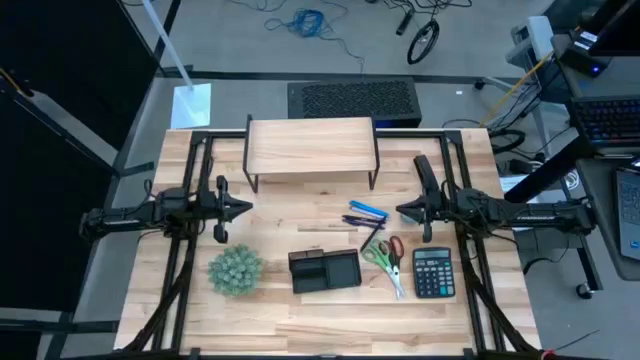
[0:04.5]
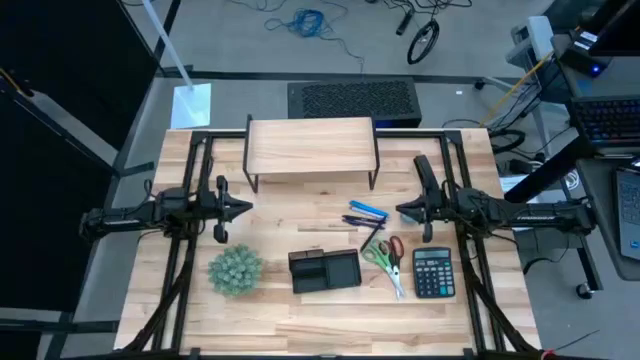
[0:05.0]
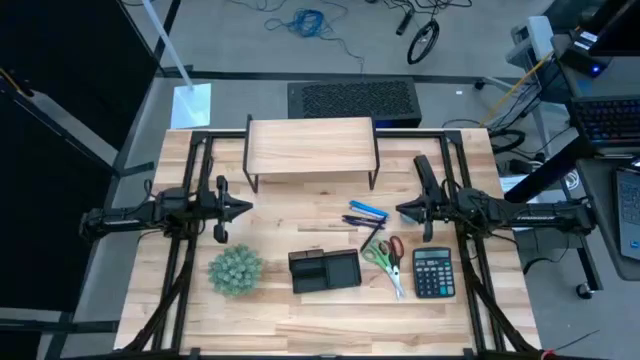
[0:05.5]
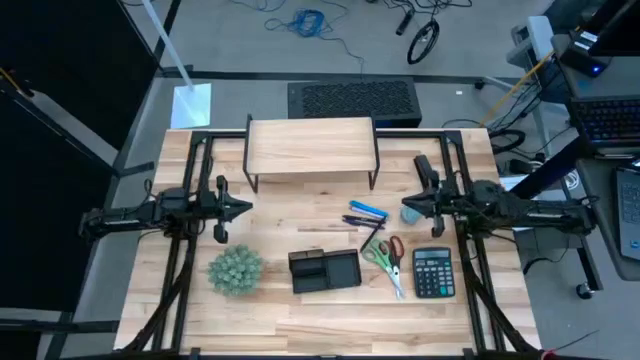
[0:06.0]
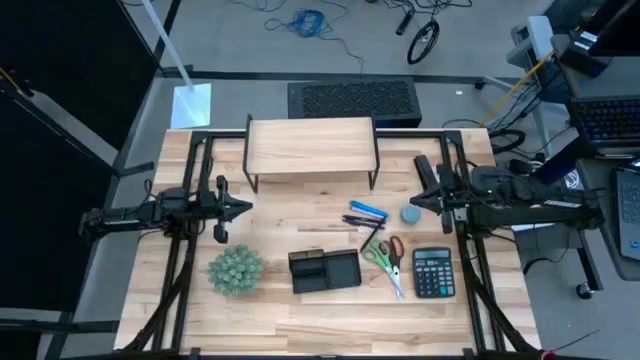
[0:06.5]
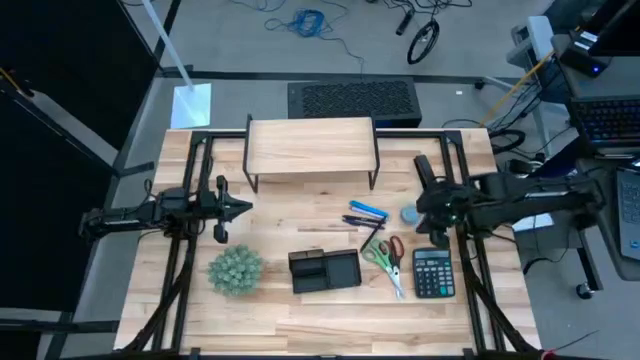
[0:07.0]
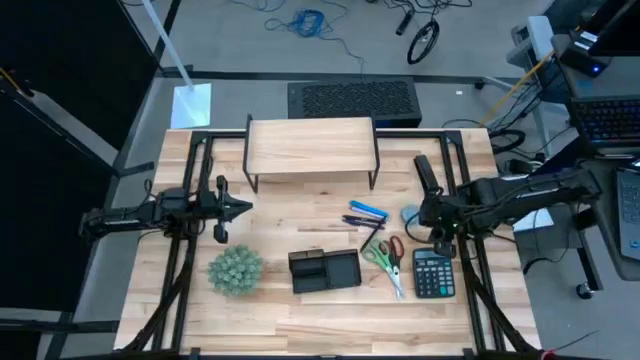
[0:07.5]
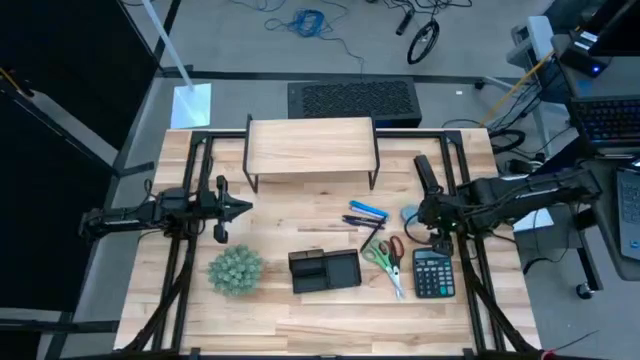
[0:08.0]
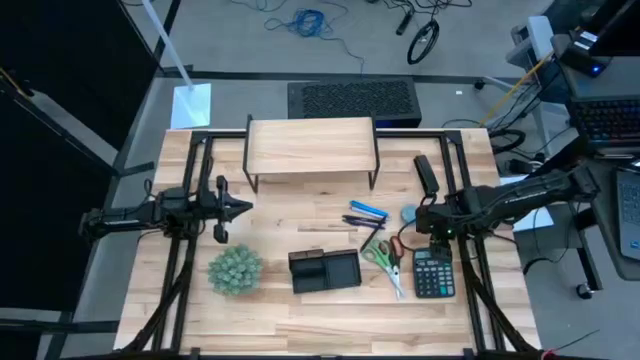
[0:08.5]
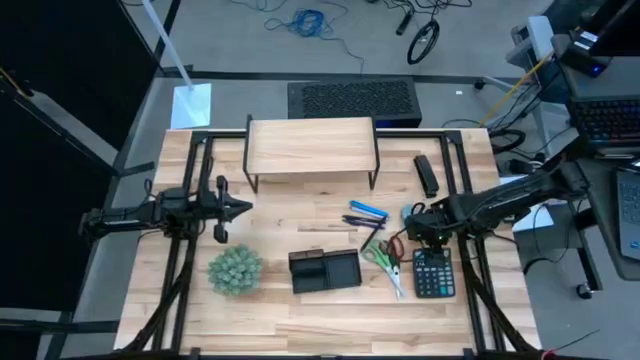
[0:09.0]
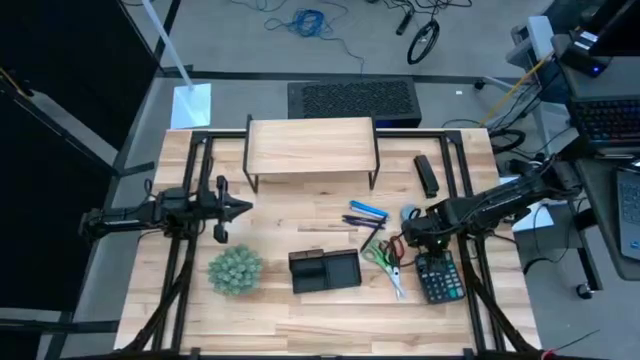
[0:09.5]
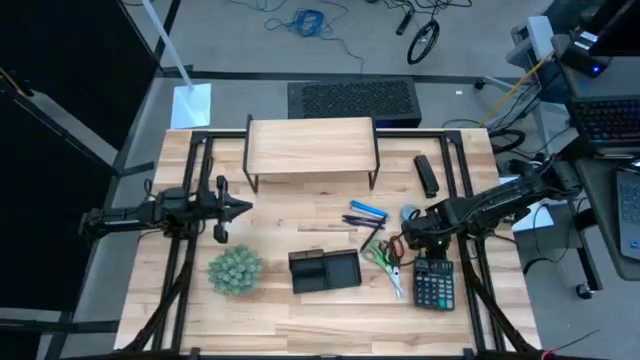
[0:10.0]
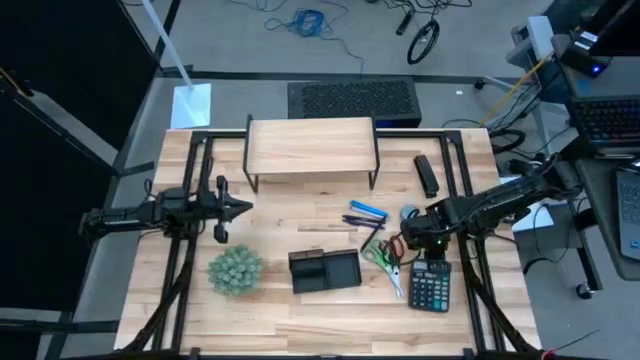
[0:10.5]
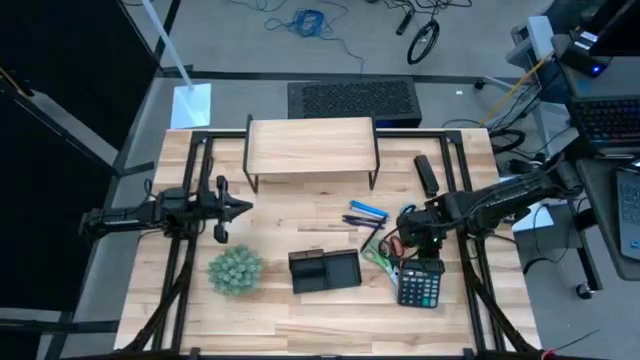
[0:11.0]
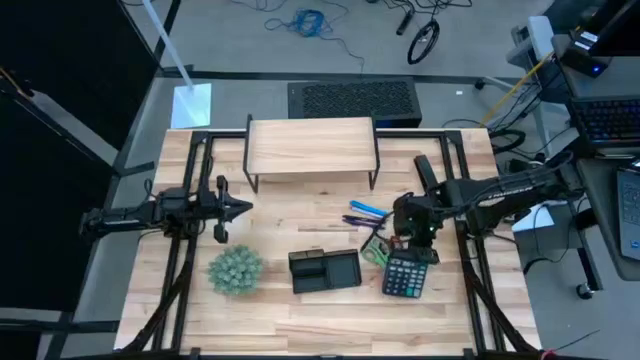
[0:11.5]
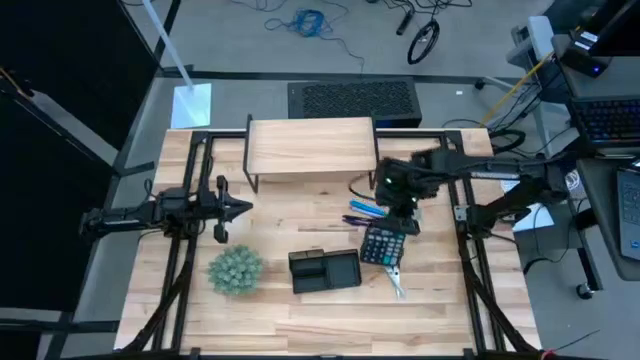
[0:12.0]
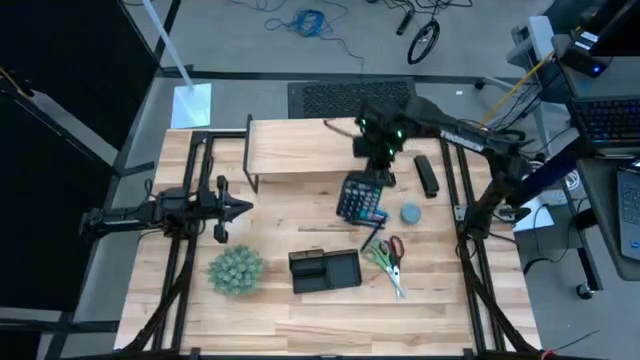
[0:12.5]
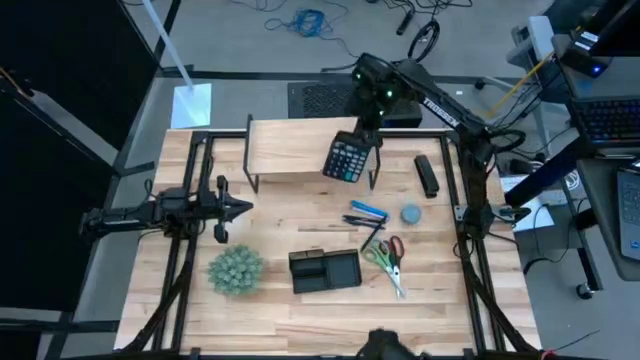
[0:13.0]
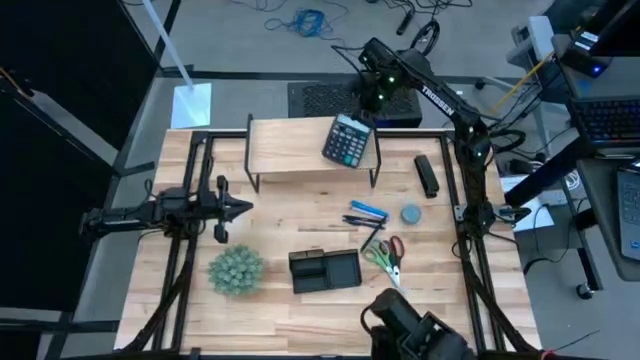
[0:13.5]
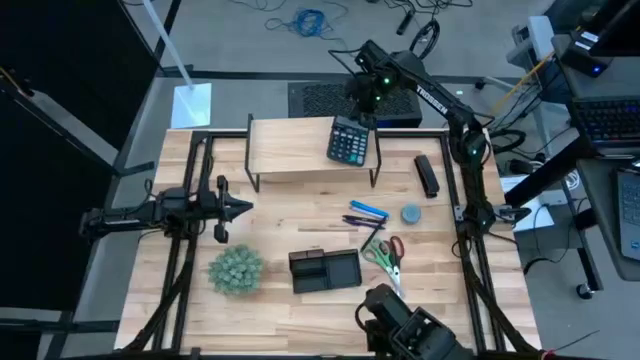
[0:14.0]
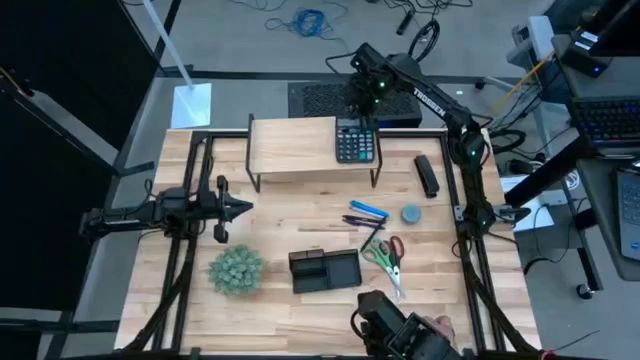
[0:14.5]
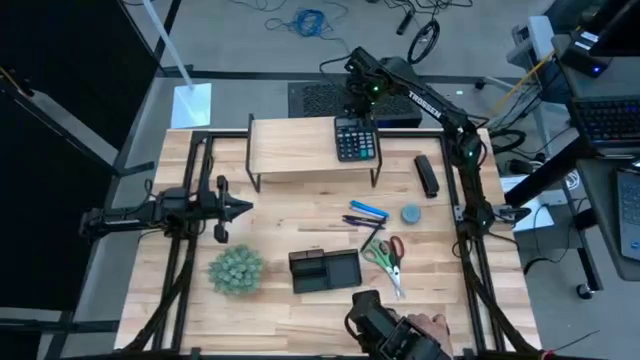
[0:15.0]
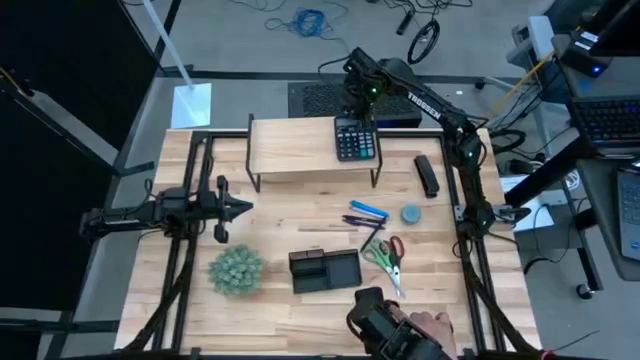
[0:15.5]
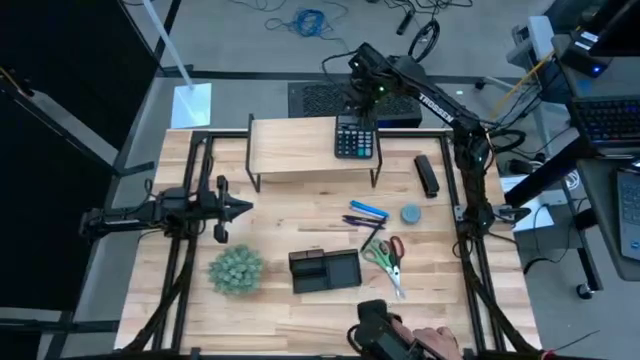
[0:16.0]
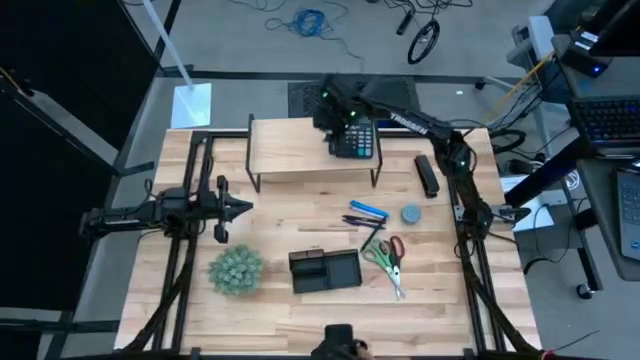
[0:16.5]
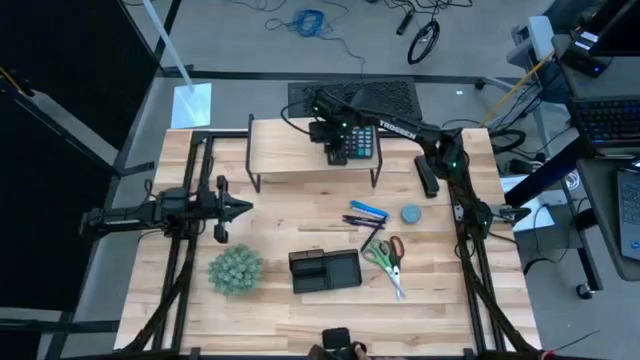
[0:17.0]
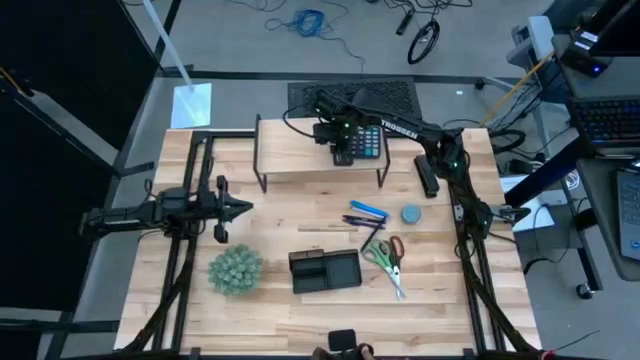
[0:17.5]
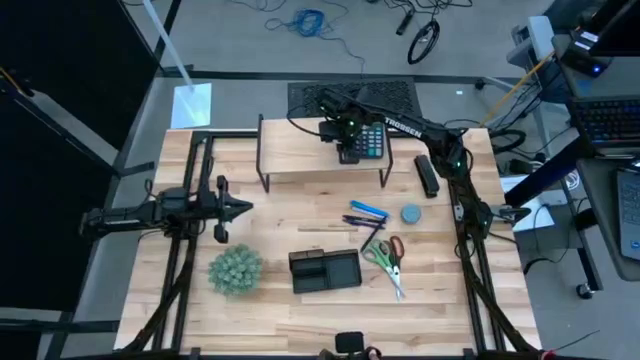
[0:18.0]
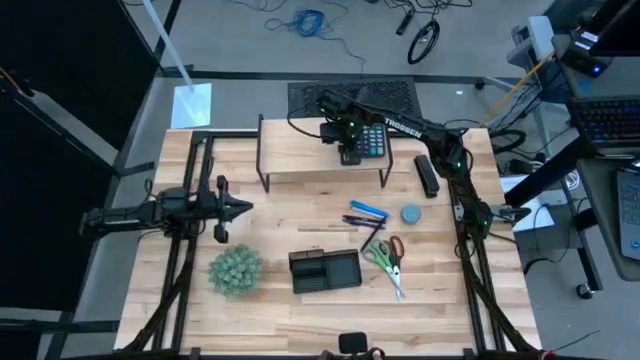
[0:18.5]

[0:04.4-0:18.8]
Task: Pick and place office supplies into organizer
Put the black calculator on the shelf

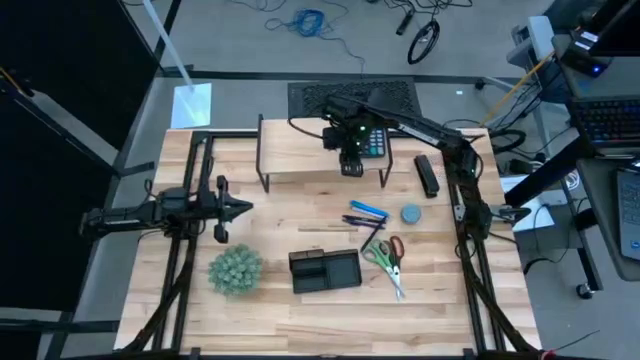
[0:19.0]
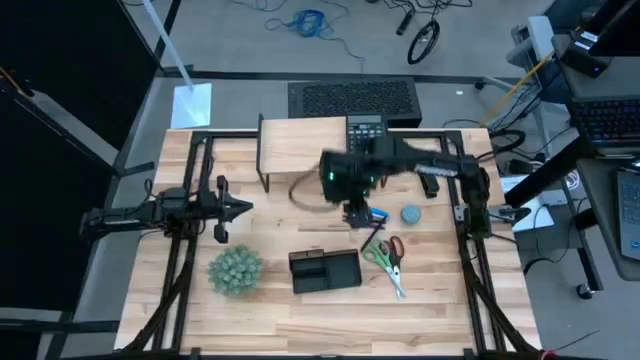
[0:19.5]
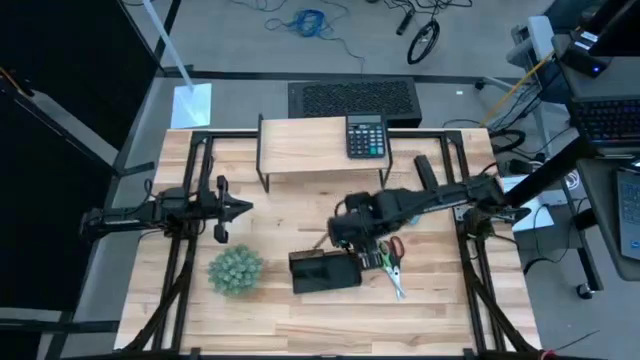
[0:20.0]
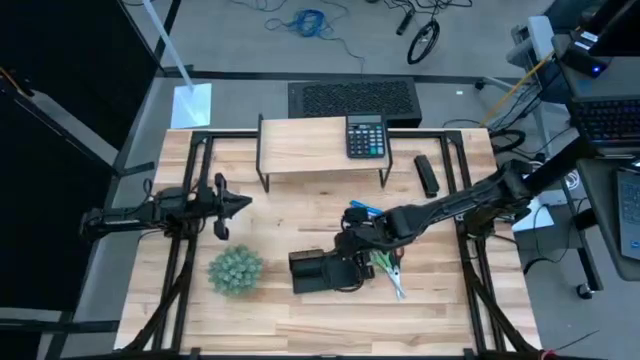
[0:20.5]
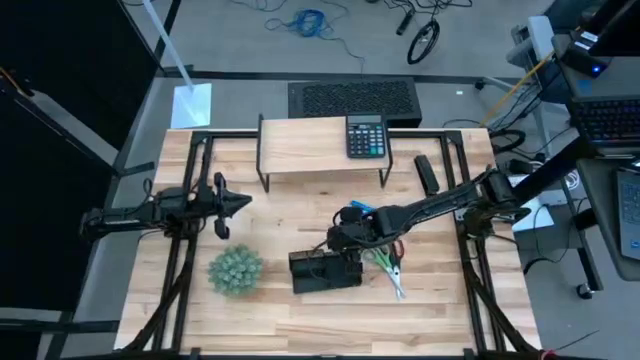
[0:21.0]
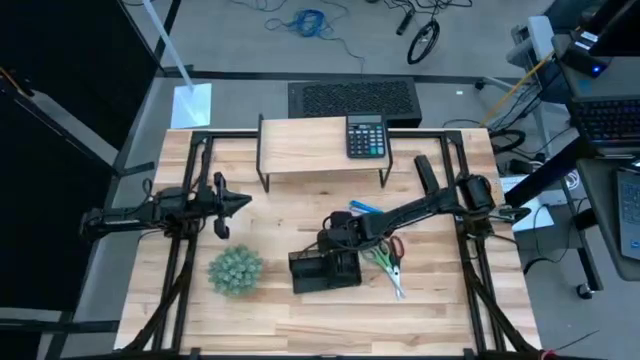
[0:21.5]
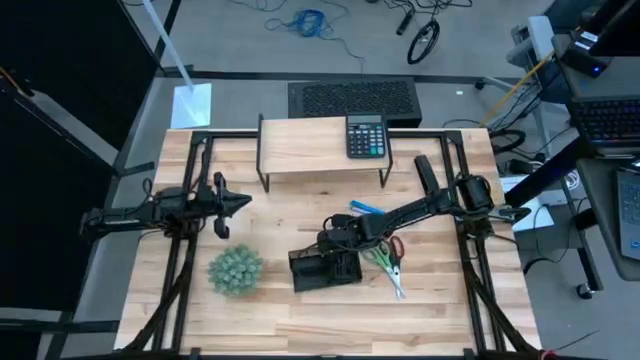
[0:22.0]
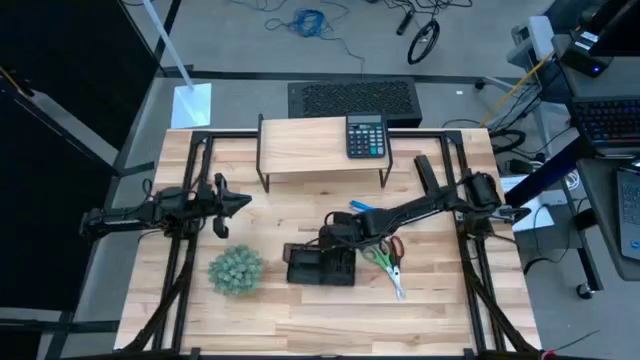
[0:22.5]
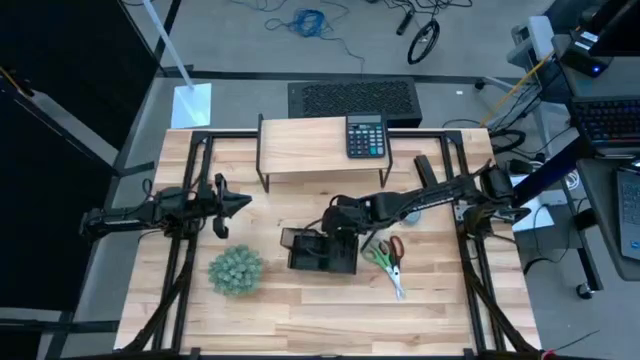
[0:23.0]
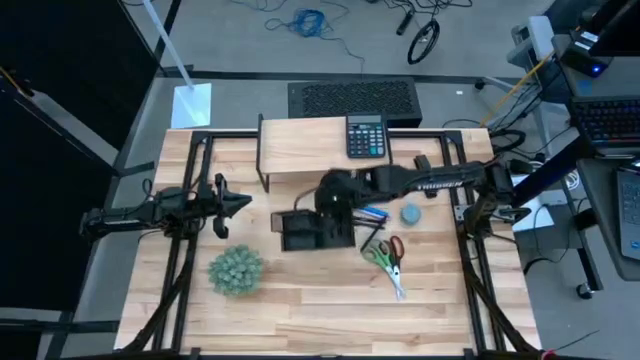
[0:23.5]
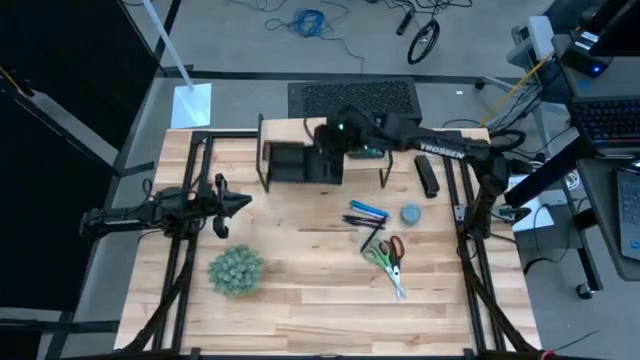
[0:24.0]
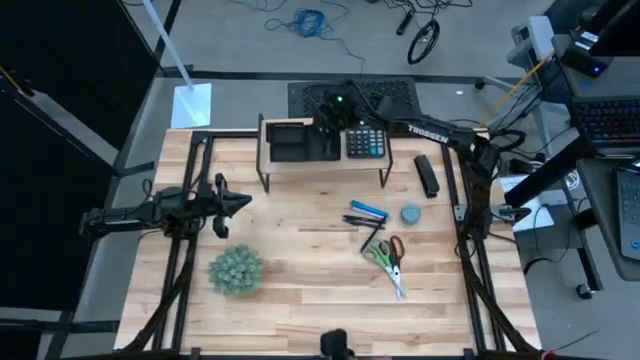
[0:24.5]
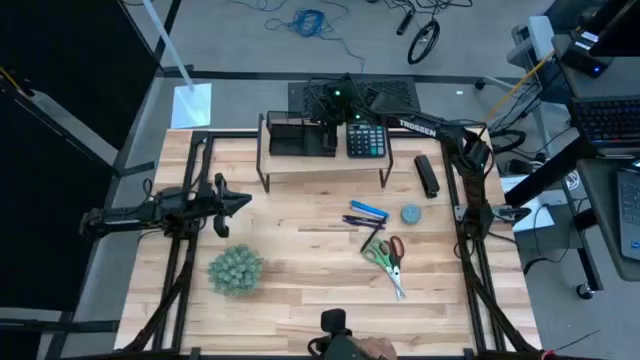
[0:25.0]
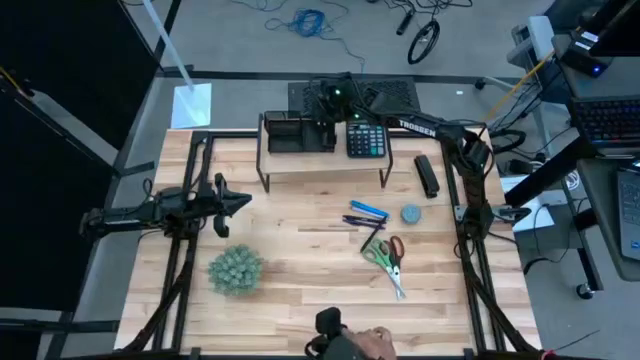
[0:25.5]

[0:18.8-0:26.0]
Put the black desk organizer on the shelf
